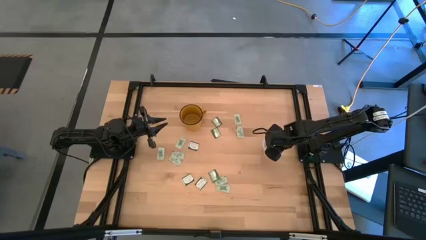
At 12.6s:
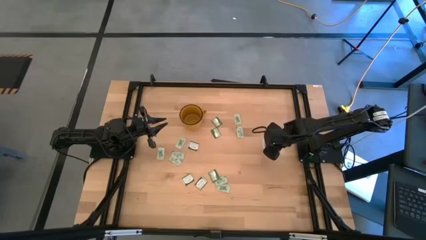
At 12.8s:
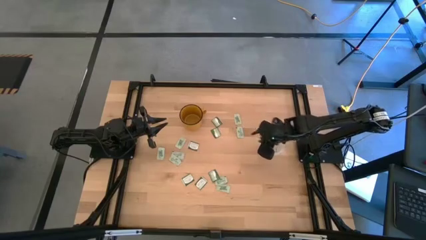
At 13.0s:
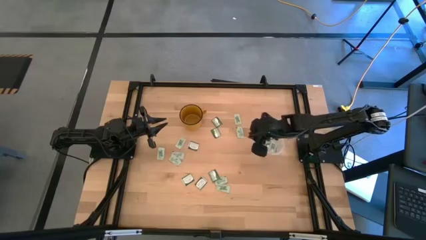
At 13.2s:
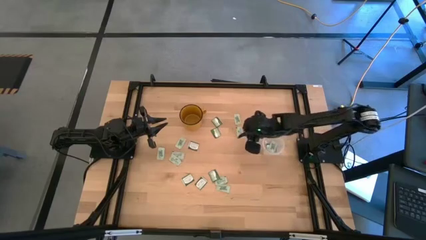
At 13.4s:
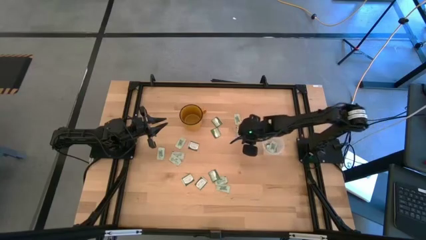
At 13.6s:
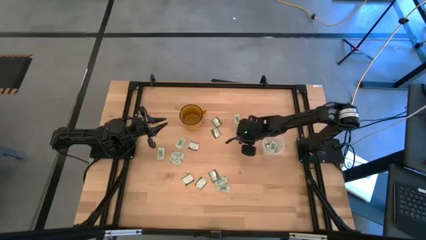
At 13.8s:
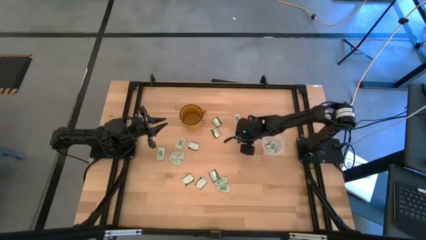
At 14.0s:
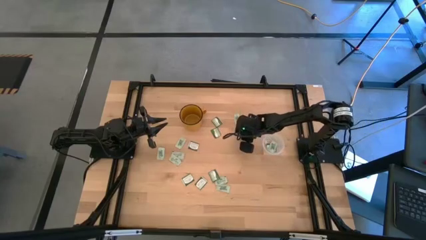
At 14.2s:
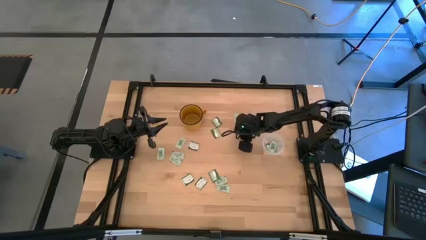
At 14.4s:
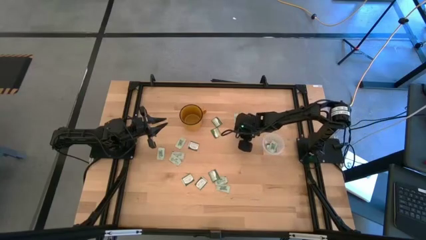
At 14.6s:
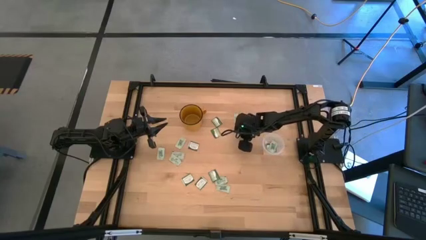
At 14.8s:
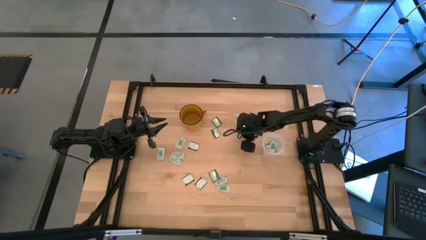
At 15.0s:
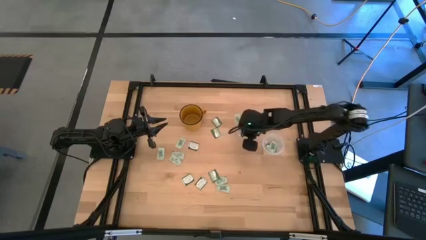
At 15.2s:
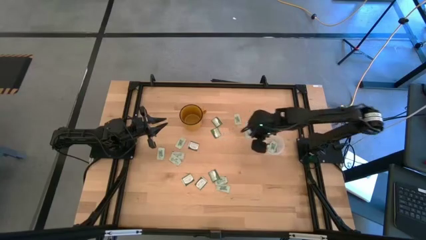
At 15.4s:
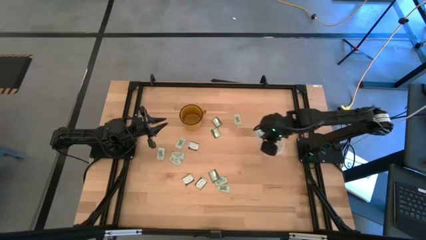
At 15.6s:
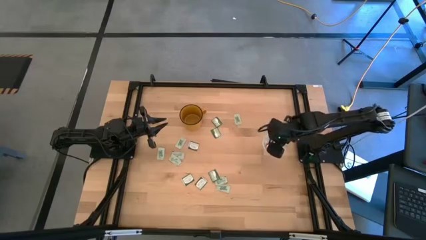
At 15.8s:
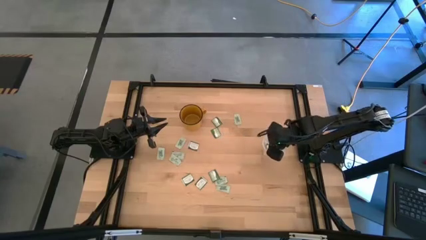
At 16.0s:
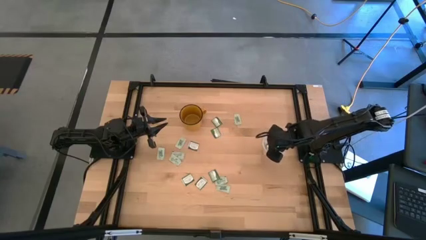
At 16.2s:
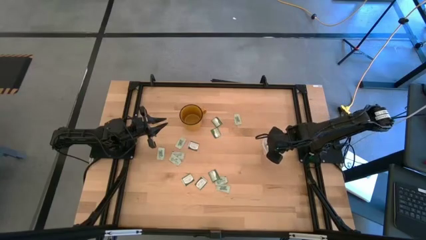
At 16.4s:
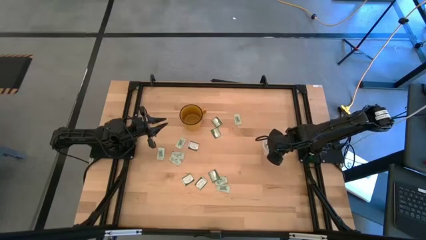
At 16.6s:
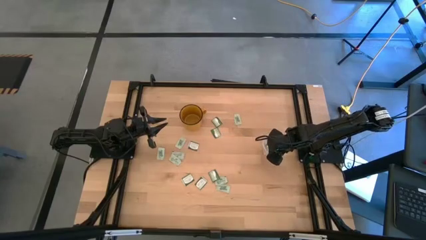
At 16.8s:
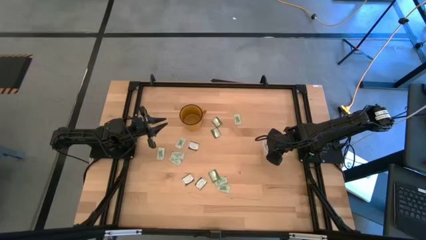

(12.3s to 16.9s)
Task: Pick and place items into bin
Put the stevia packet into the transparent bin

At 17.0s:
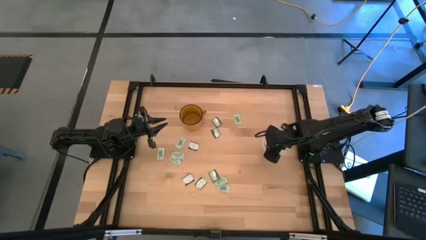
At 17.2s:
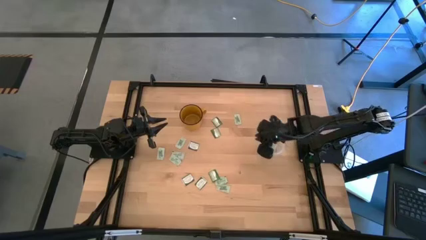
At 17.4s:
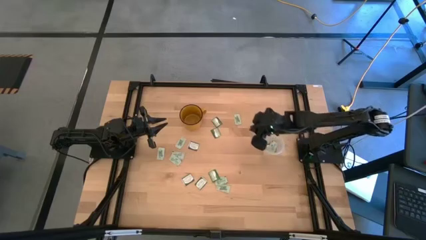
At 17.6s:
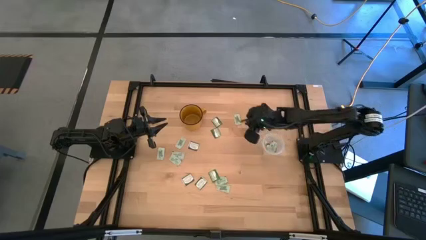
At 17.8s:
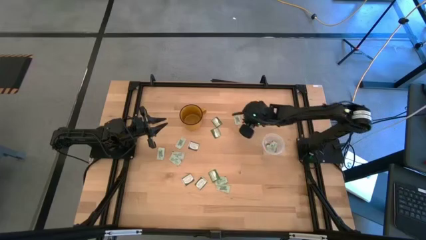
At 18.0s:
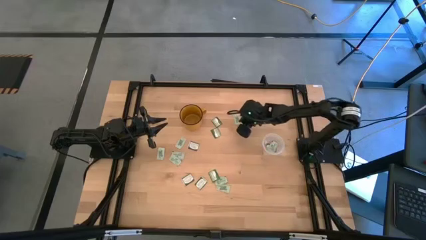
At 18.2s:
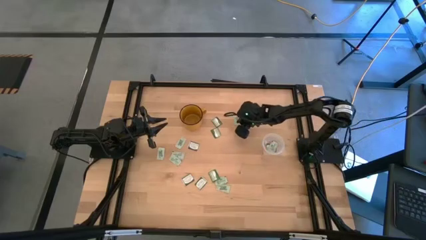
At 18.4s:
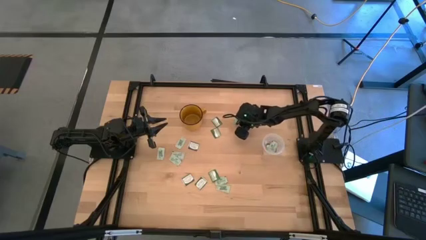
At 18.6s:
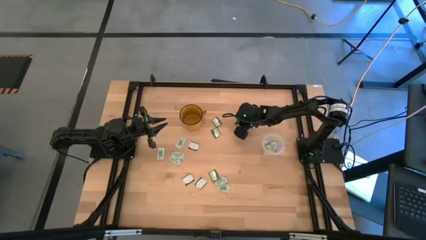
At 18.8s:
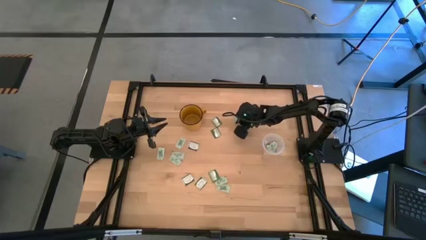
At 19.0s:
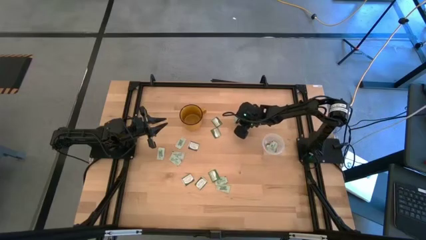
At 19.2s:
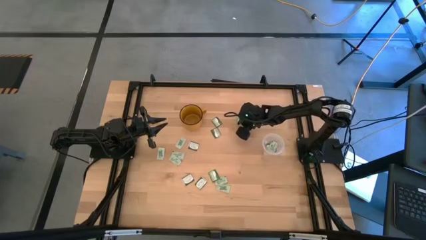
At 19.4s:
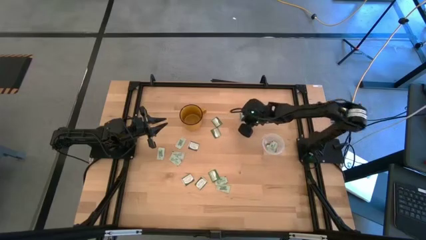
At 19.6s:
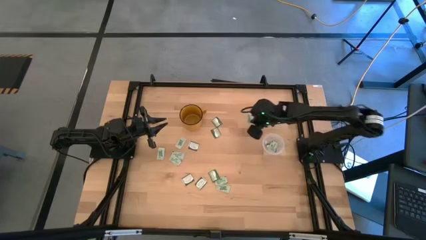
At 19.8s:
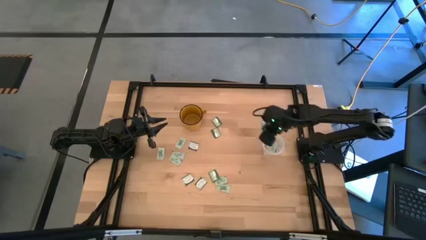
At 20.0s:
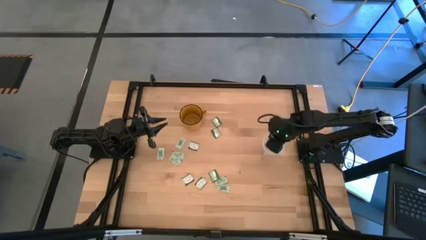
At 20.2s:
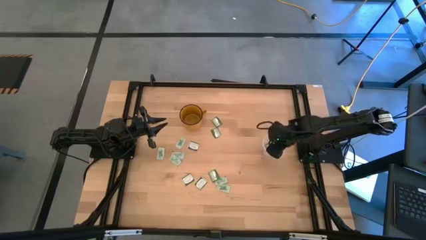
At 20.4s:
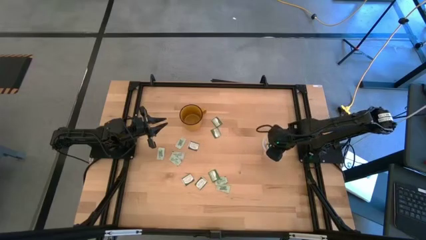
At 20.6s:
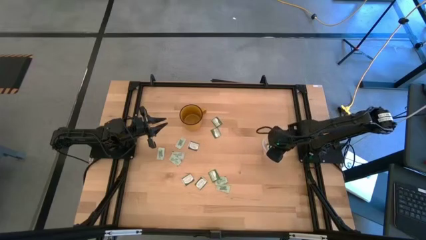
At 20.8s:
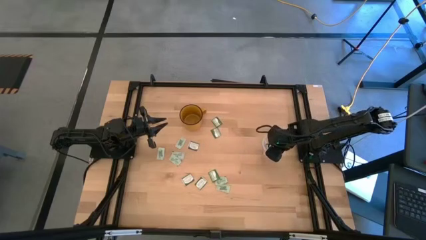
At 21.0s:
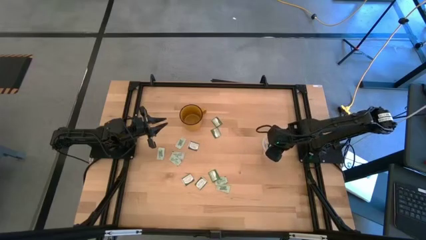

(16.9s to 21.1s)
Put the stevia packet into the transparent bin

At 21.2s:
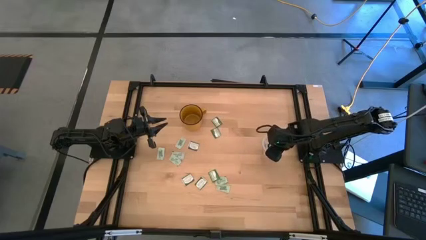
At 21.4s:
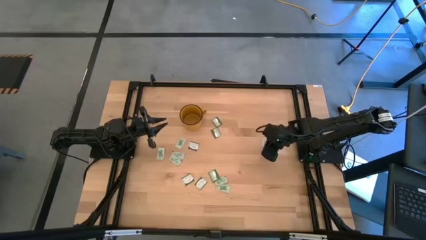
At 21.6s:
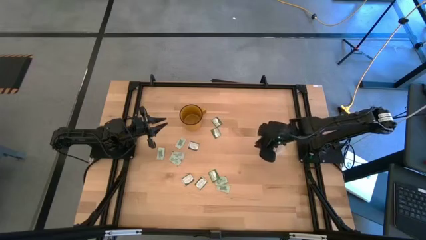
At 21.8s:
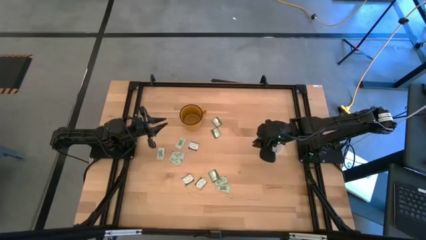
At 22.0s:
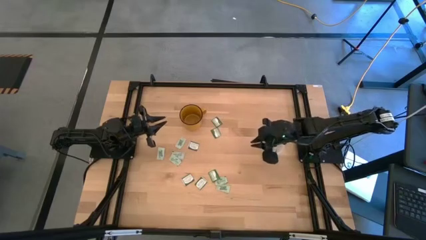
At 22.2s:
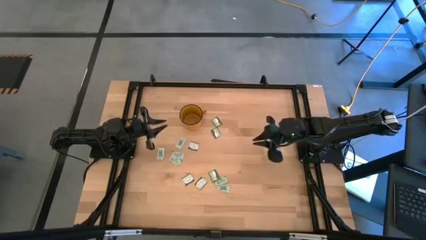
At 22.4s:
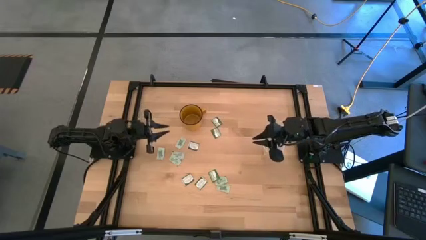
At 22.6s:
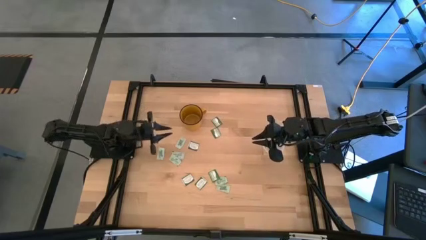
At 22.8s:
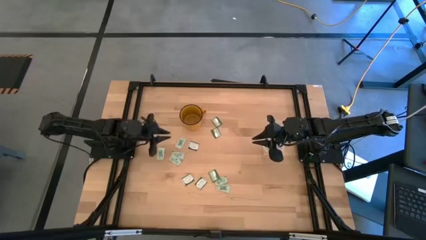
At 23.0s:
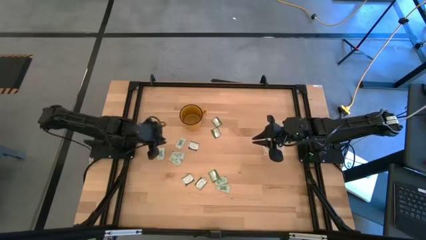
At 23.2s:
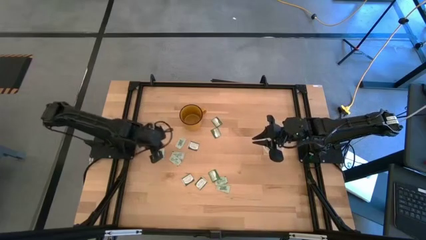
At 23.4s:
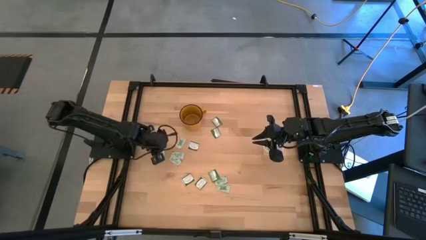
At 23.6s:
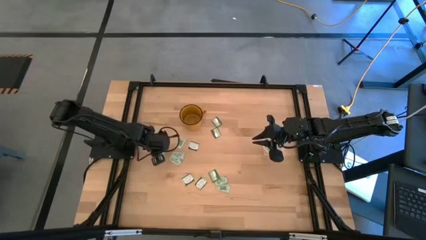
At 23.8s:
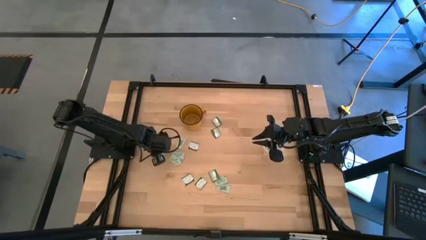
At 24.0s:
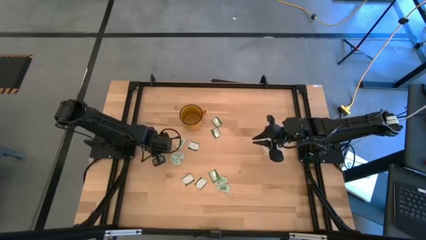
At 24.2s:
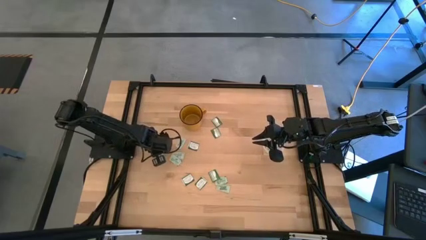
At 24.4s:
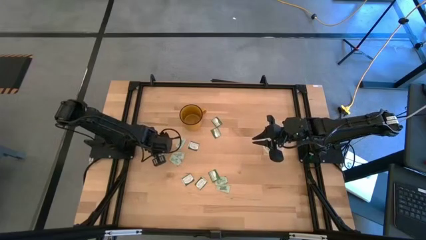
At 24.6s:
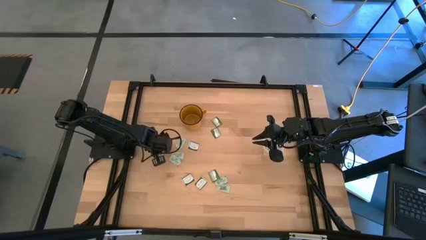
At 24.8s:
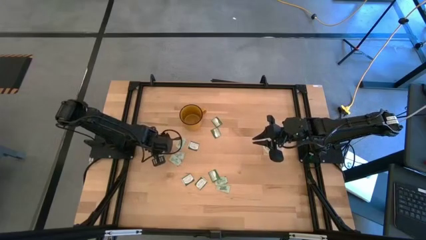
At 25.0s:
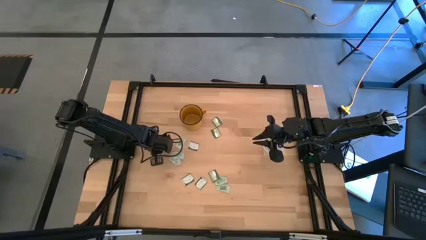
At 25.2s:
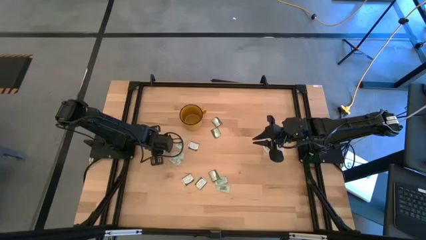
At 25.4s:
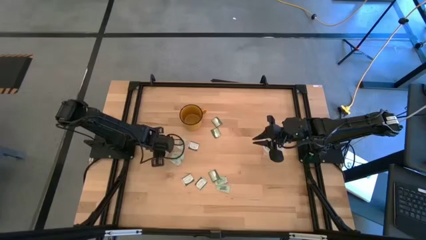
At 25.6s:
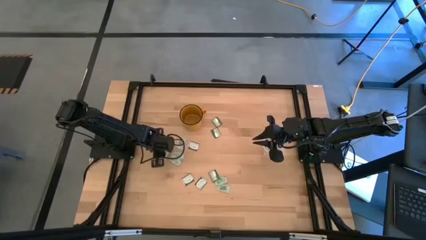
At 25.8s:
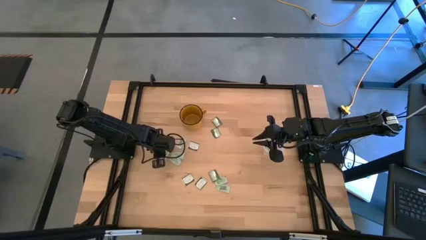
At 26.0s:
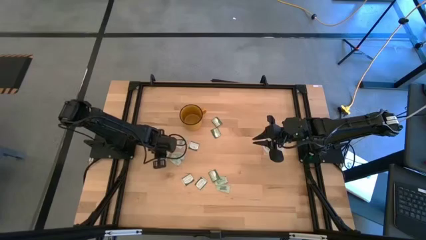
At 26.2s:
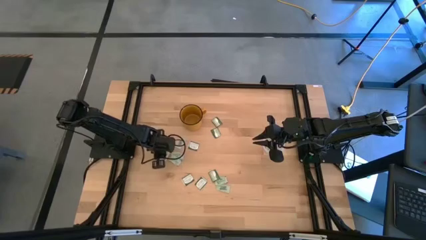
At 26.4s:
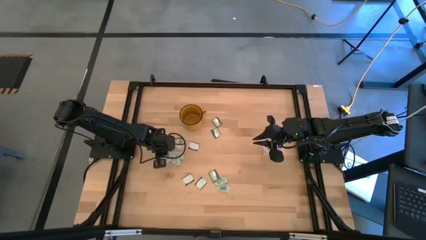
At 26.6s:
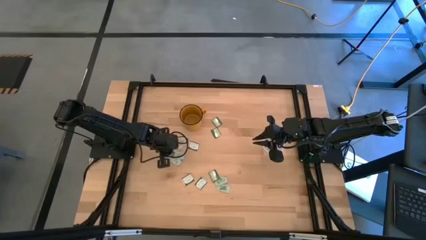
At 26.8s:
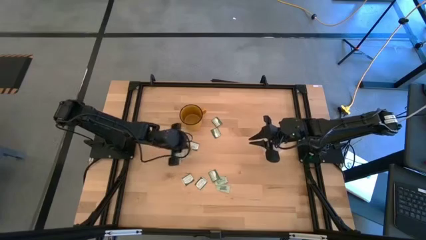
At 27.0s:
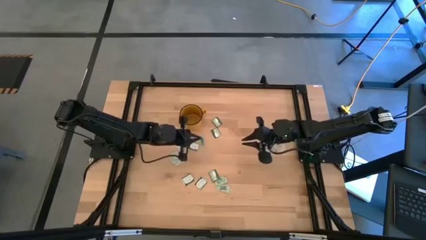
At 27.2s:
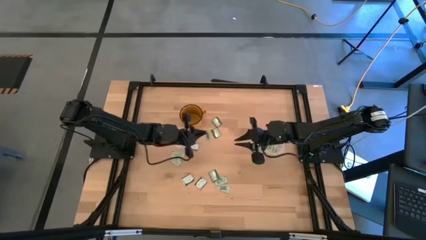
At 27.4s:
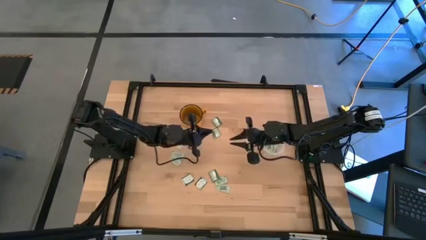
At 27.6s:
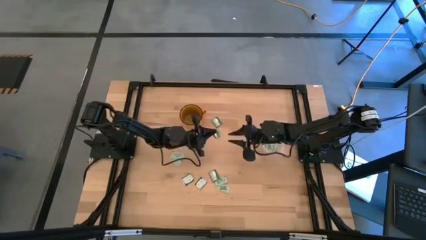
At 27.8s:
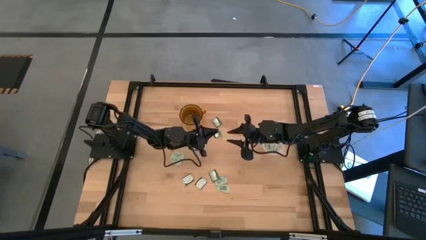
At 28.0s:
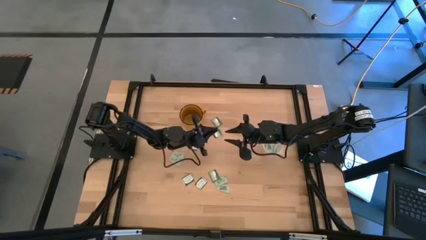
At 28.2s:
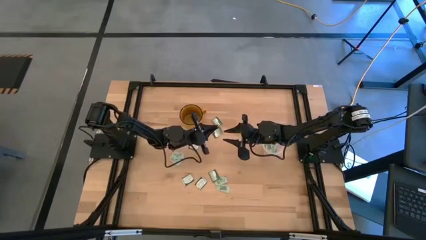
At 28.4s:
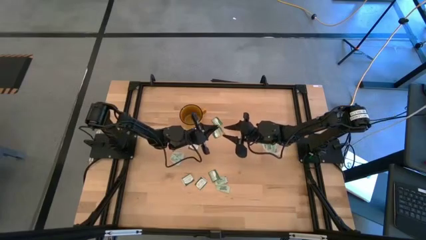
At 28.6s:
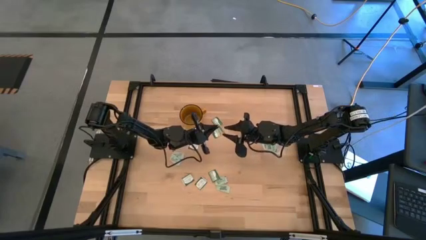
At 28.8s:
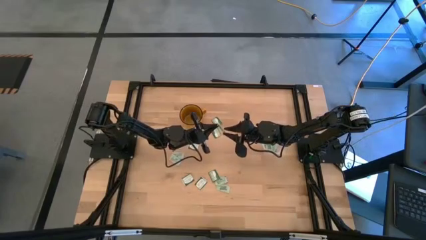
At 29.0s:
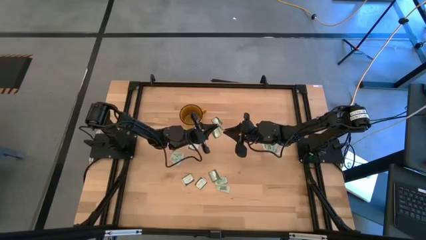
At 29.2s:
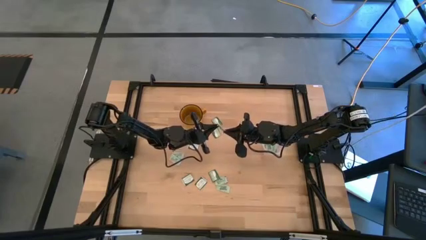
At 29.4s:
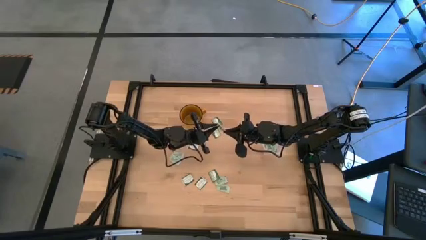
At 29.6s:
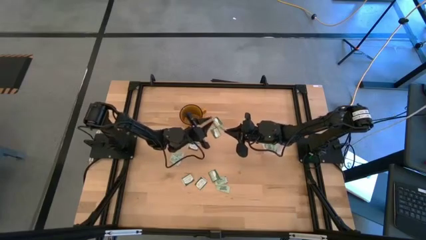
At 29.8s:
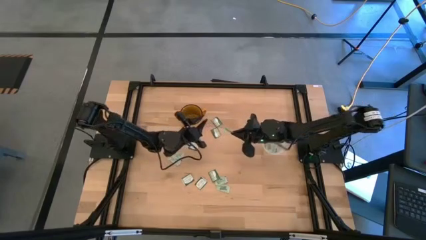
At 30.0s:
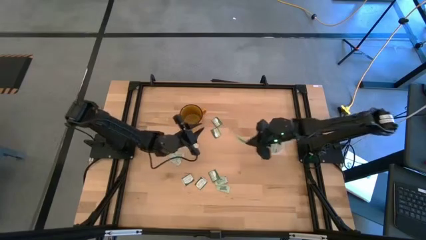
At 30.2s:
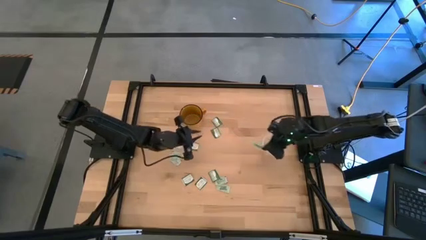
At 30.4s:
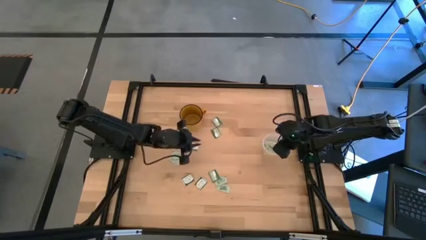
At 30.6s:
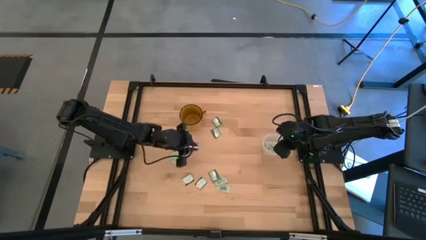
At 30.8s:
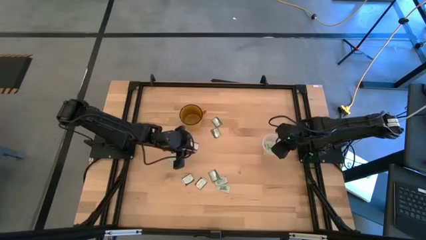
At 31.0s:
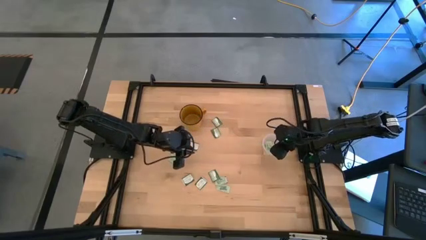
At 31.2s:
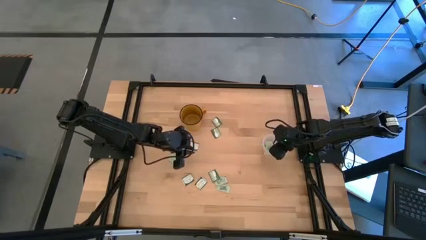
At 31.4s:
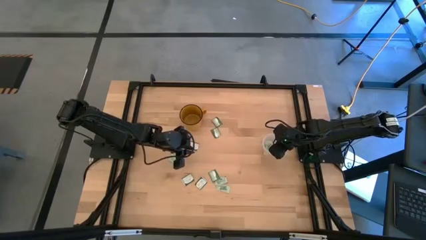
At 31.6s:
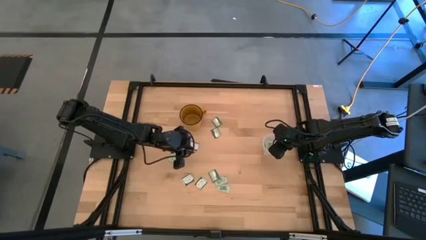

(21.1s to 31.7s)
Put the stevia packet into the transparent bin
